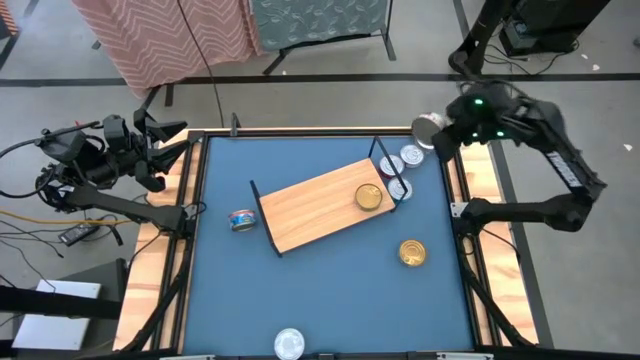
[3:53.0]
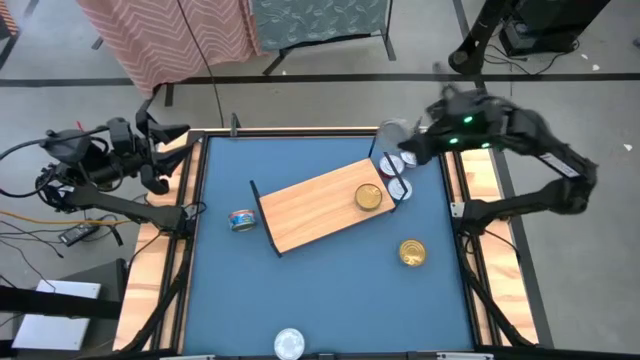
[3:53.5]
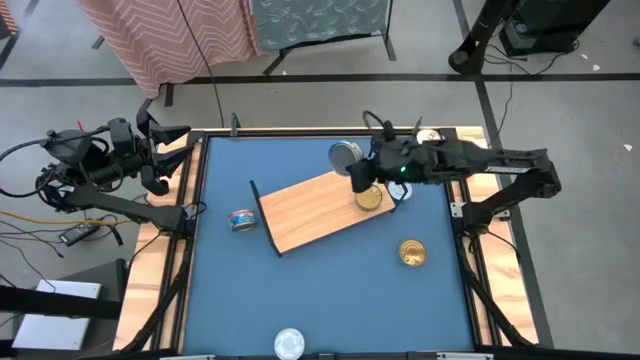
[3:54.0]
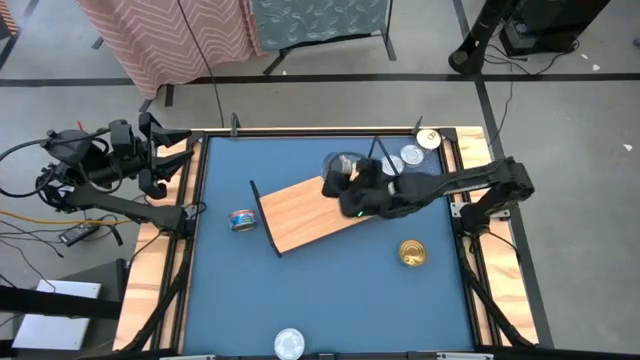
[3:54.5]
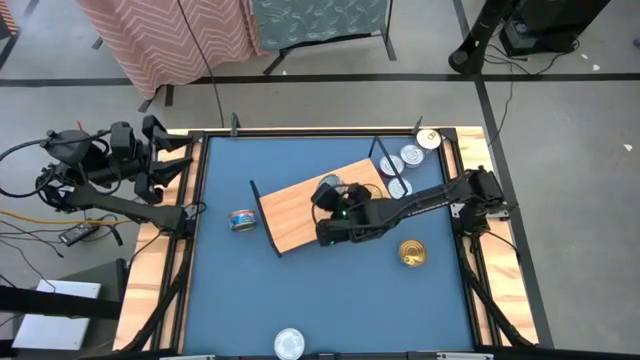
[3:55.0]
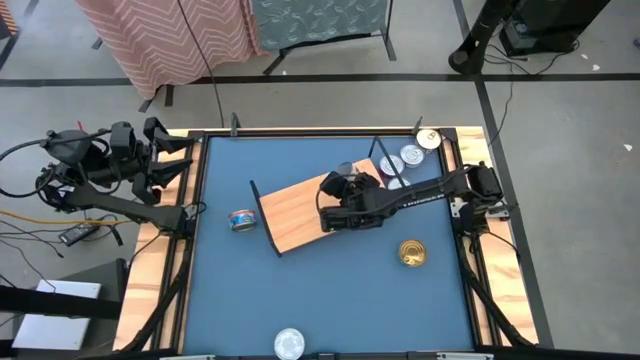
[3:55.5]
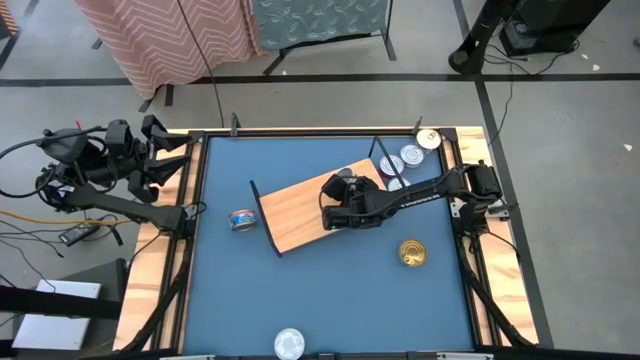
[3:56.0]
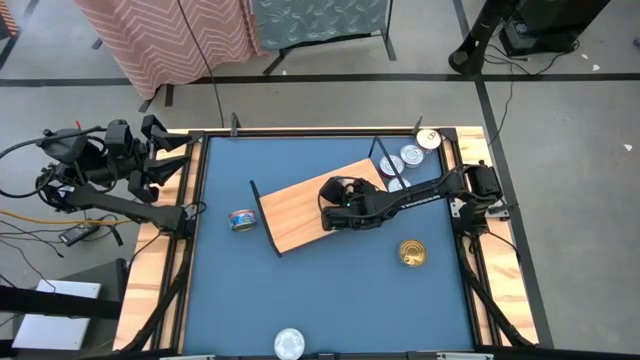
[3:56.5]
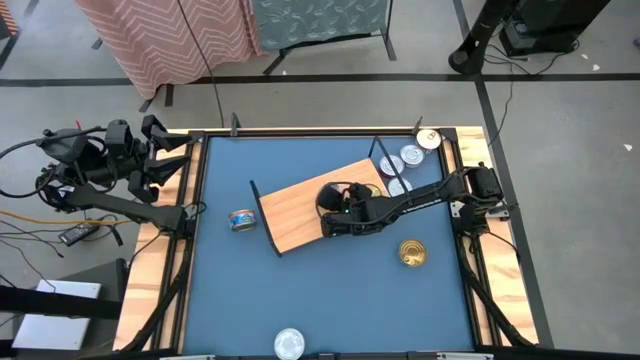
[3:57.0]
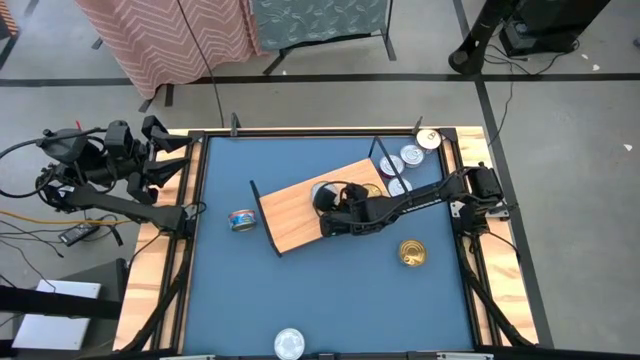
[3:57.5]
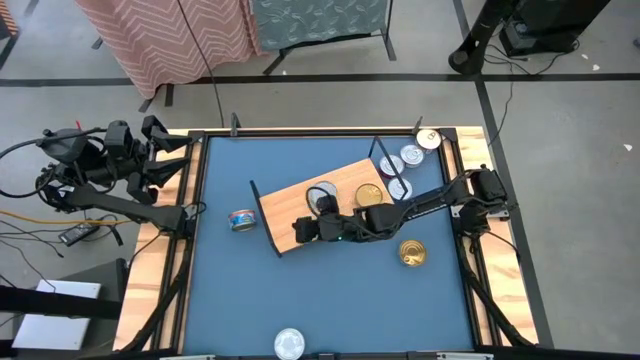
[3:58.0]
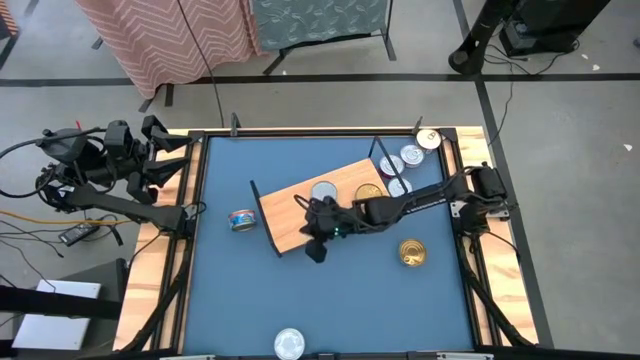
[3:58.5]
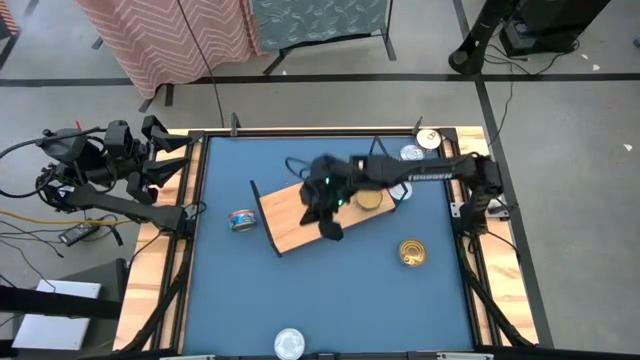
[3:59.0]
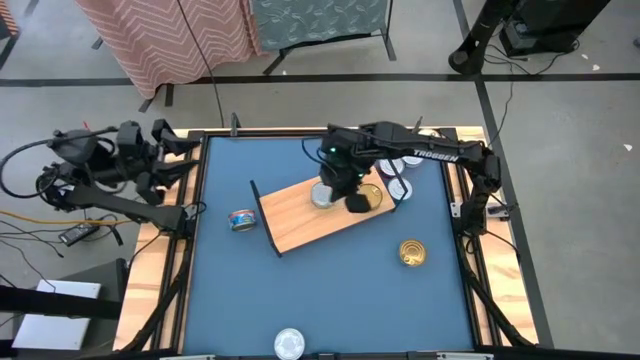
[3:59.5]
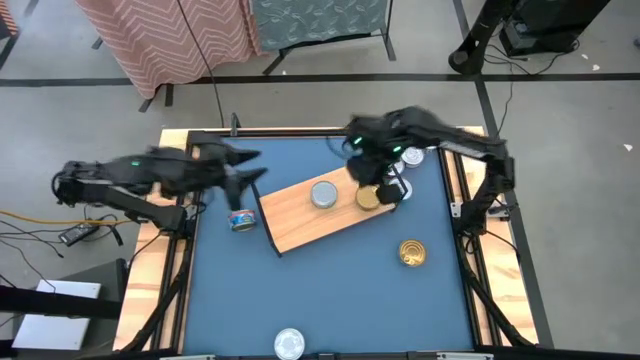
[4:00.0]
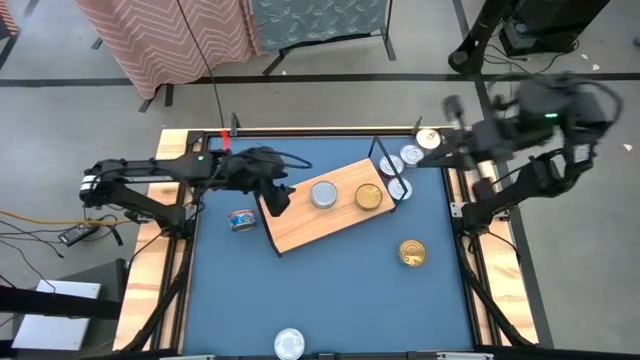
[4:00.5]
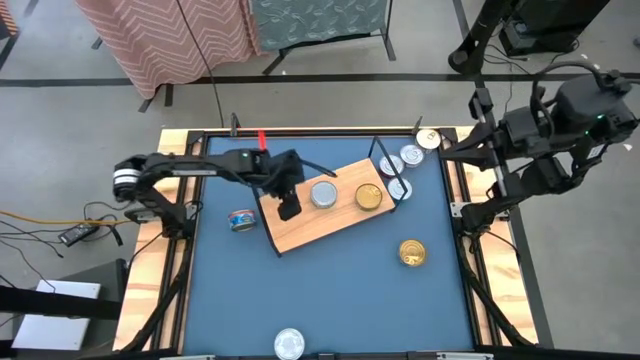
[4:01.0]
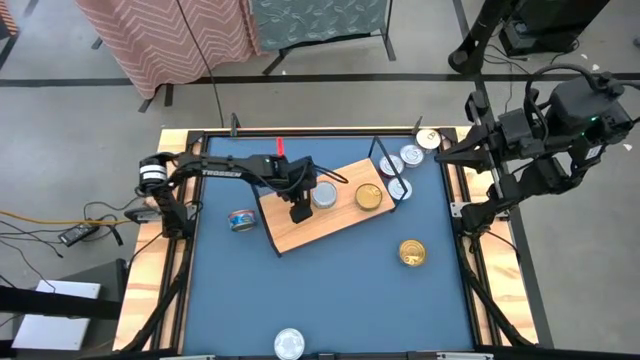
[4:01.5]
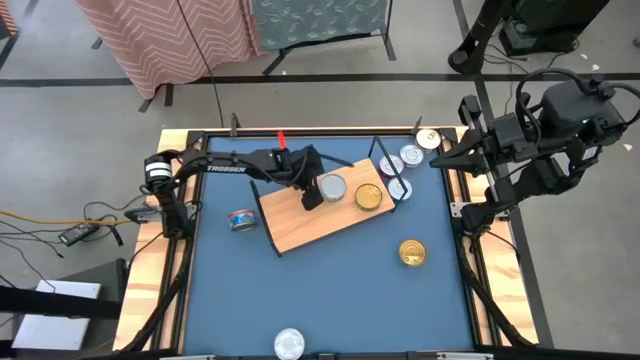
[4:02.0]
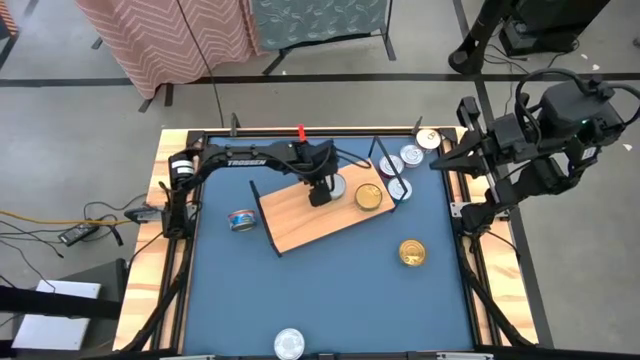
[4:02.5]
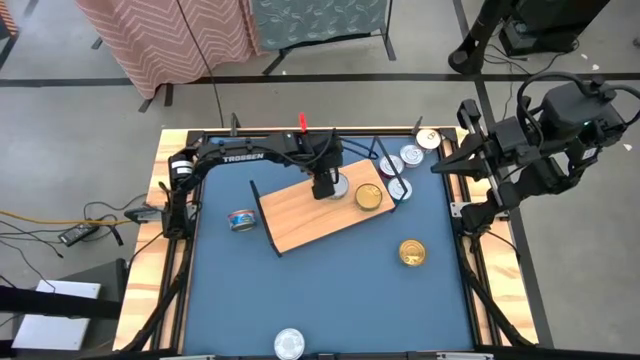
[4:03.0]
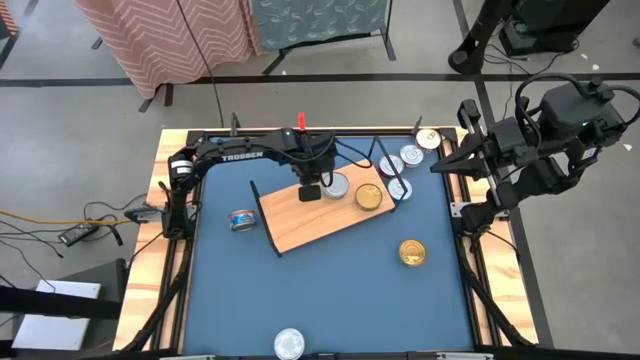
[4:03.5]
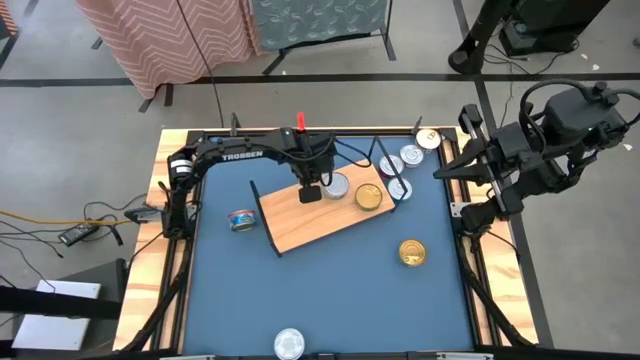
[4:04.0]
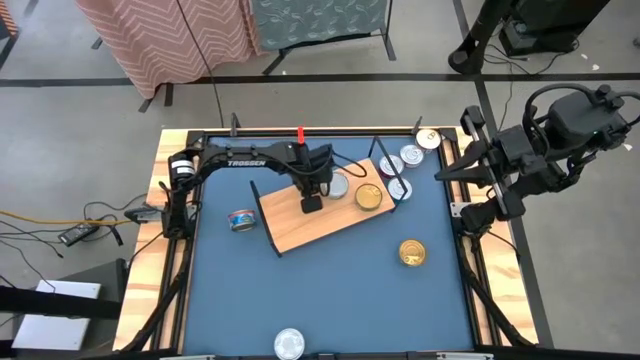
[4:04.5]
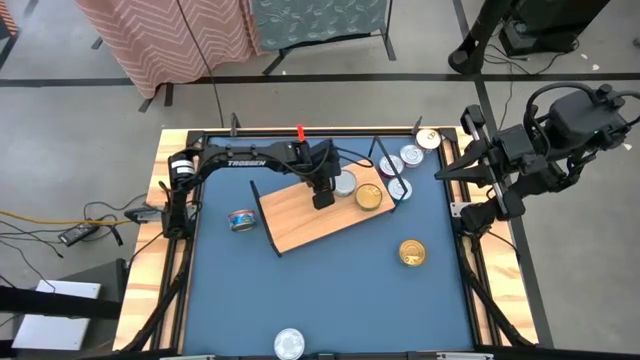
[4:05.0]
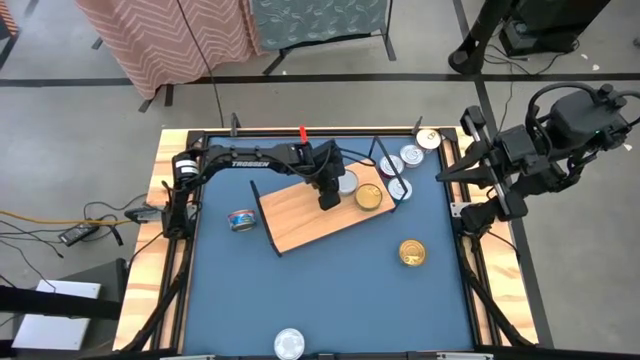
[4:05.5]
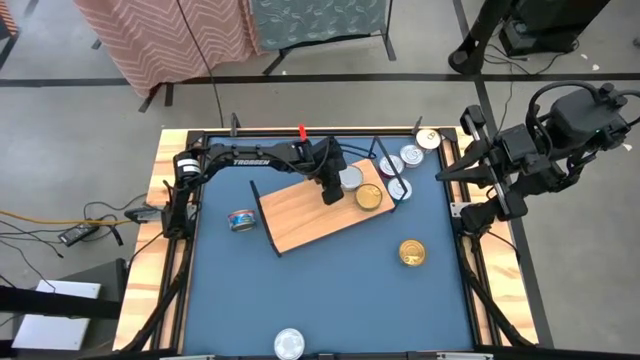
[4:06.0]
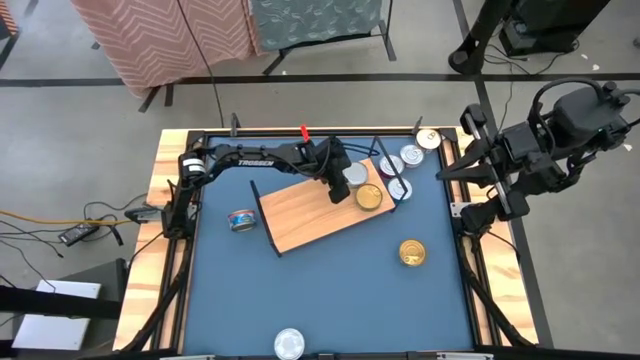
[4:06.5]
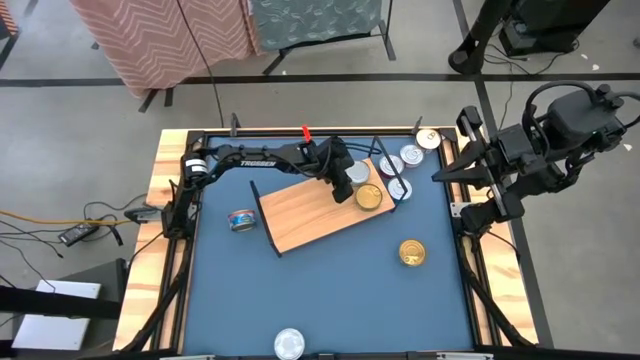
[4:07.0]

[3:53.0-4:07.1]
Task: Stack canned seafood by type on shelf
Put the green tuna can on the shelf

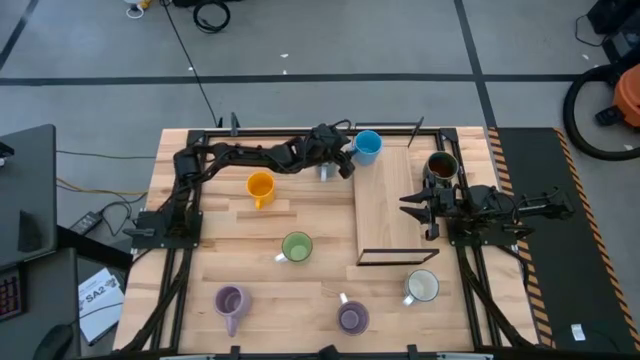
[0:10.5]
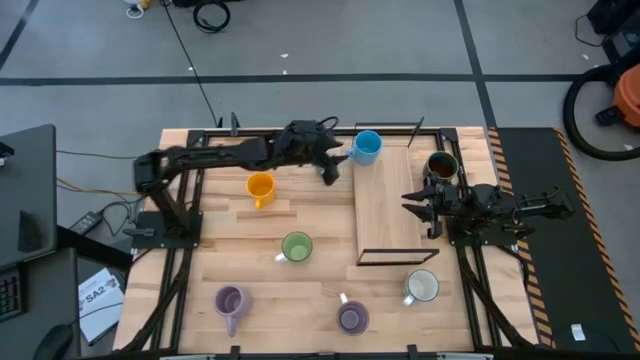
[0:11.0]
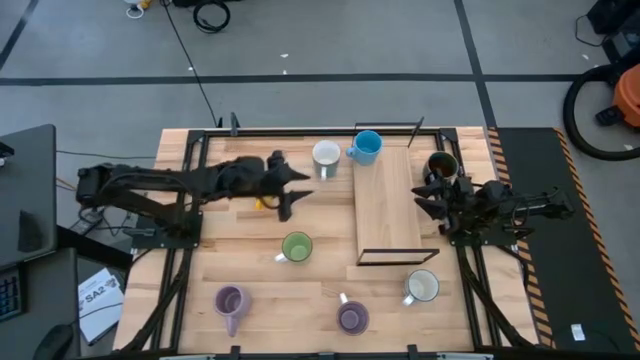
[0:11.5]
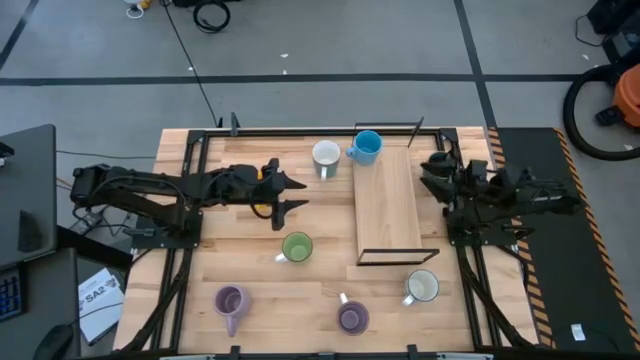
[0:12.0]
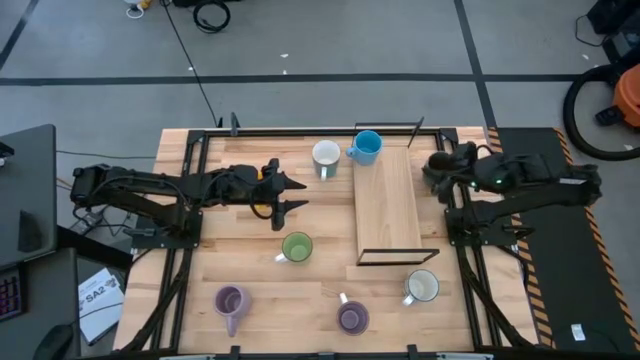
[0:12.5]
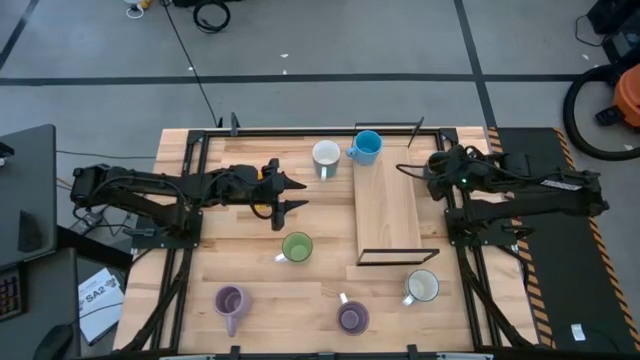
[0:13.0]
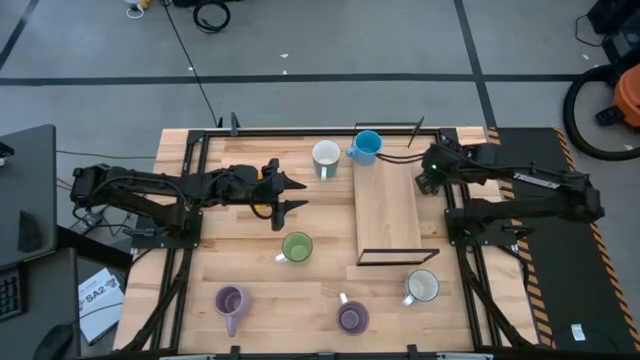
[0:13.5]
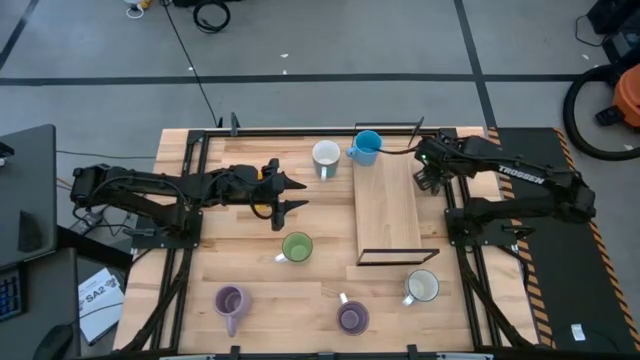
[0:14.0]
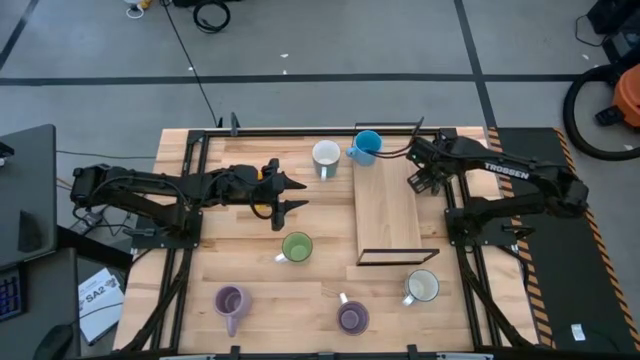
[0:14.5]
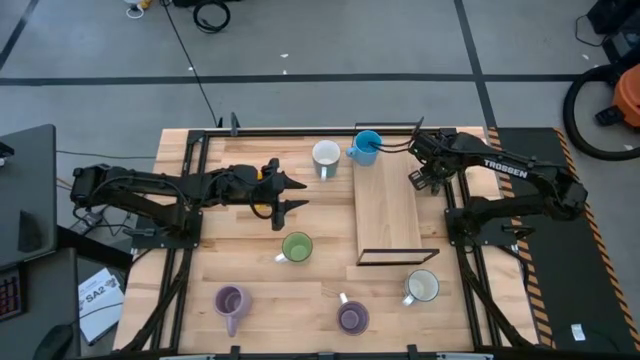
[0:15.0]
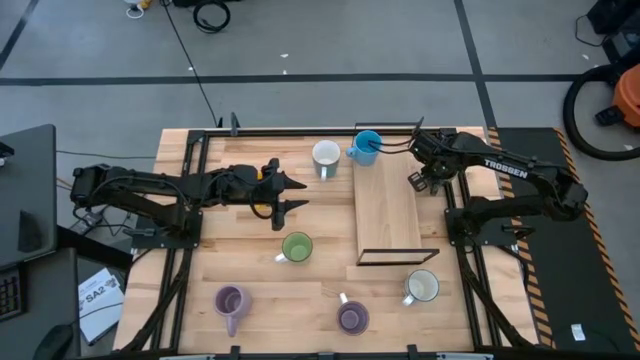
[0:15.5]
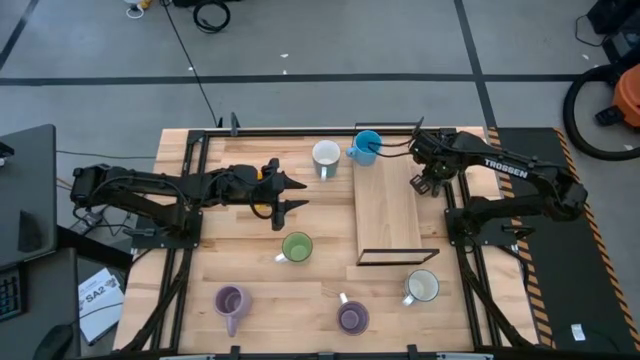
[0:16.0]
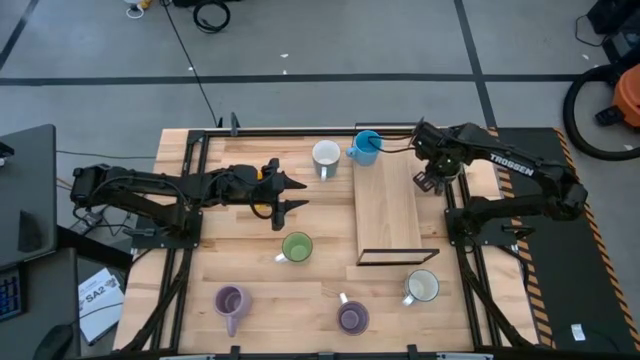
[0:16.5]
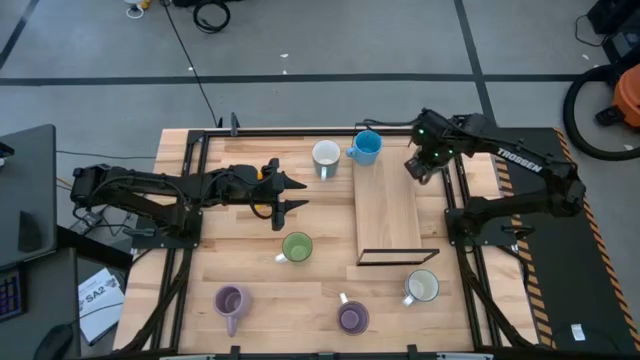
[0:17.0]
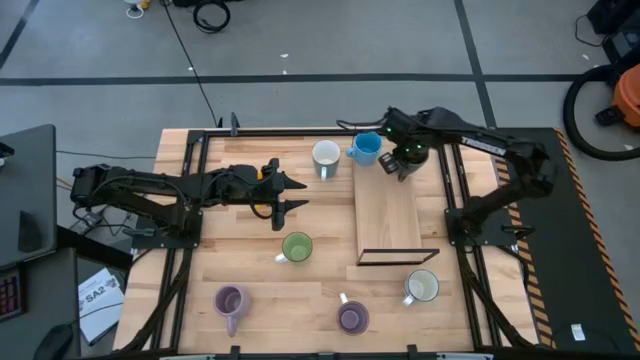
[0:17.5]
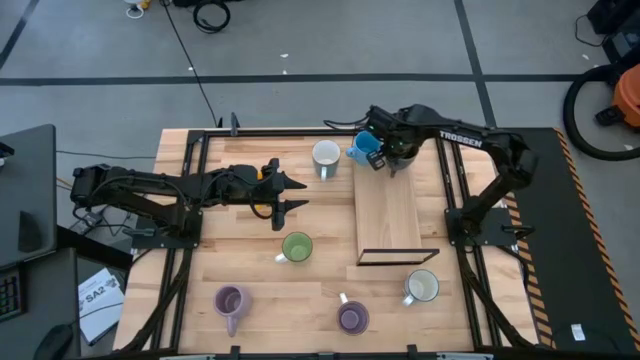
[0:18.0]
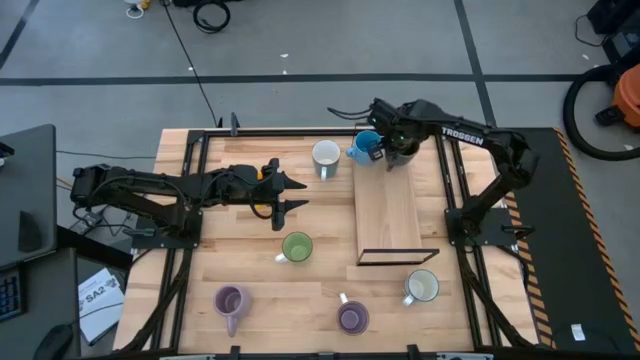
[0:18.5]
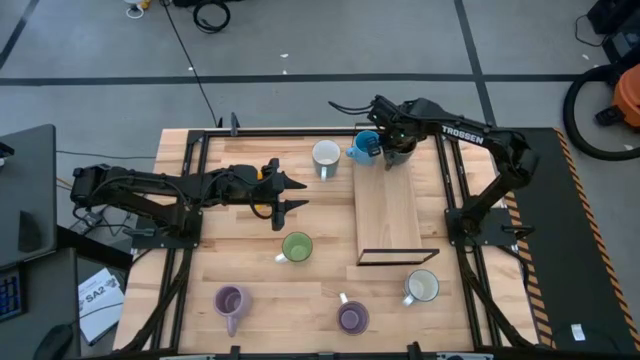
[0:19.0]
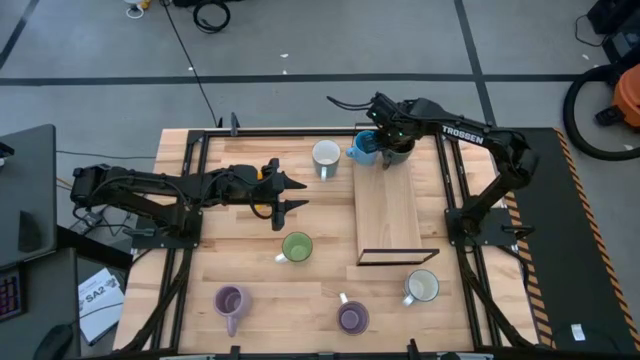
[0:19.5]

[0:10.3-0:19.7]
Task: Place coffee mugs
Put the dark blue patterned mug on the shelf
